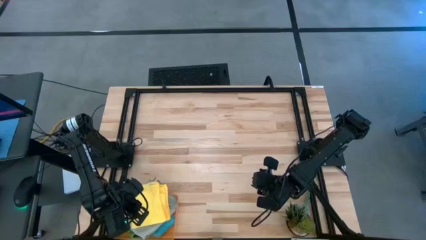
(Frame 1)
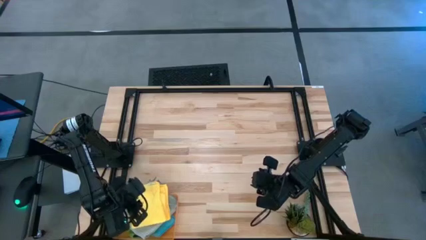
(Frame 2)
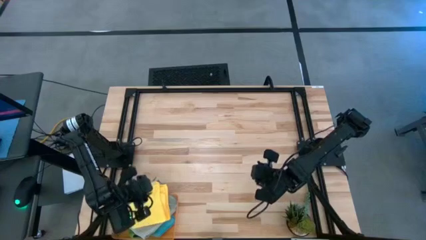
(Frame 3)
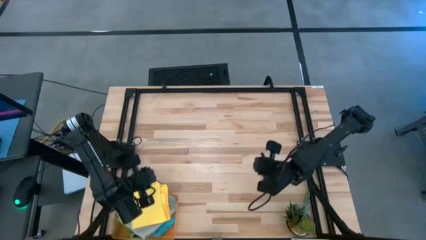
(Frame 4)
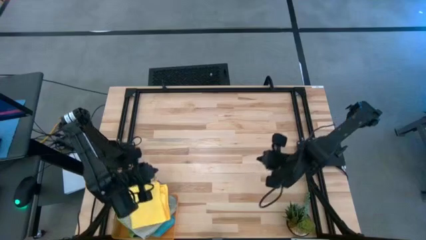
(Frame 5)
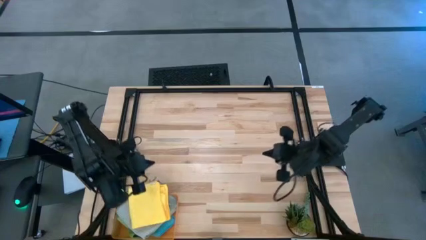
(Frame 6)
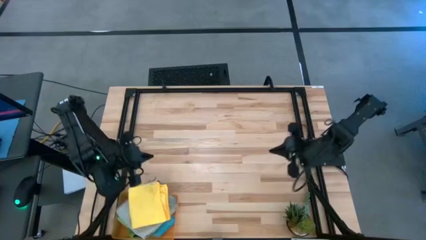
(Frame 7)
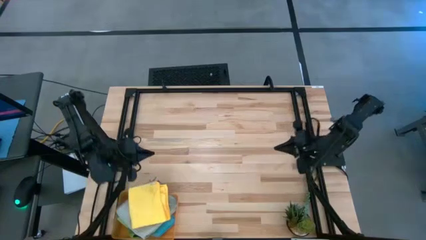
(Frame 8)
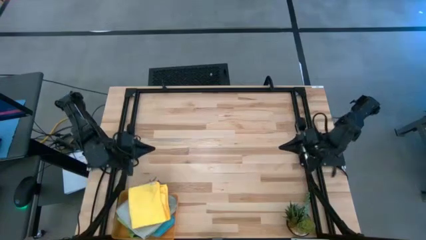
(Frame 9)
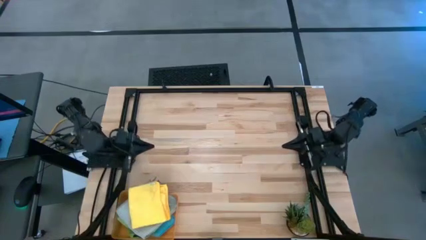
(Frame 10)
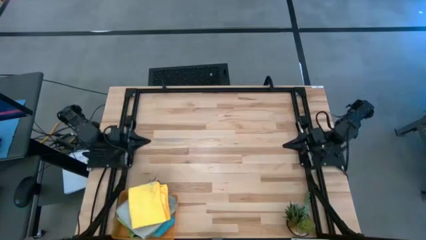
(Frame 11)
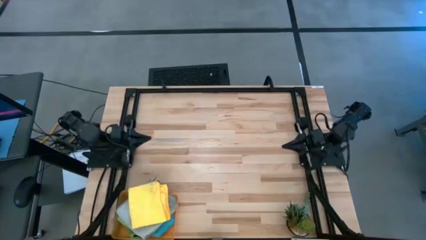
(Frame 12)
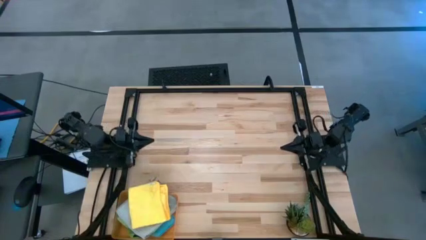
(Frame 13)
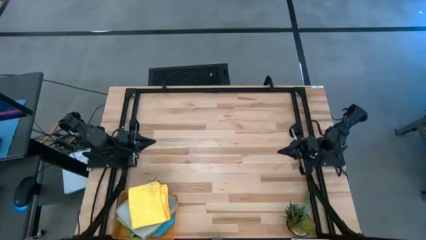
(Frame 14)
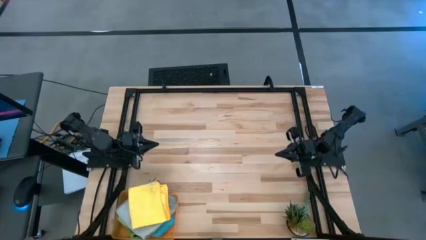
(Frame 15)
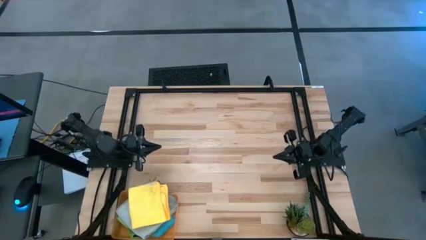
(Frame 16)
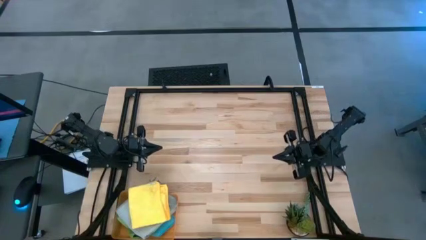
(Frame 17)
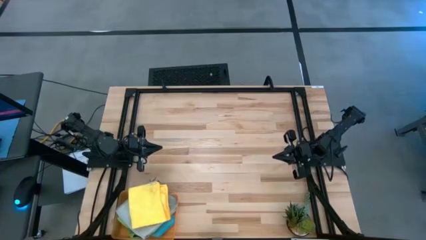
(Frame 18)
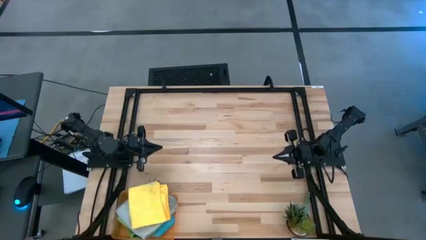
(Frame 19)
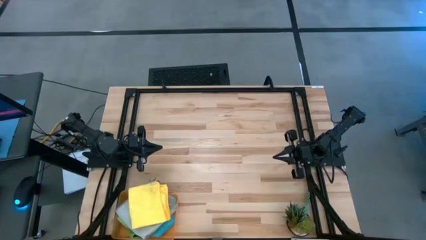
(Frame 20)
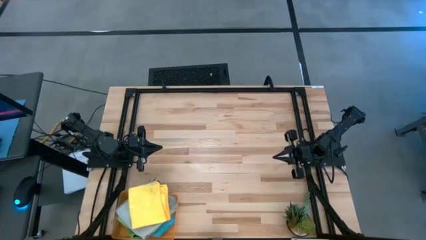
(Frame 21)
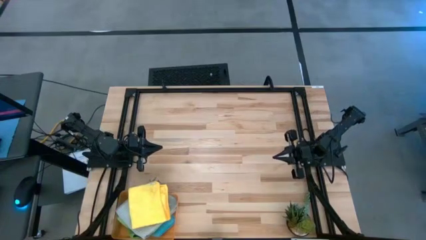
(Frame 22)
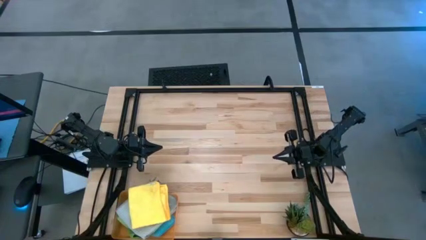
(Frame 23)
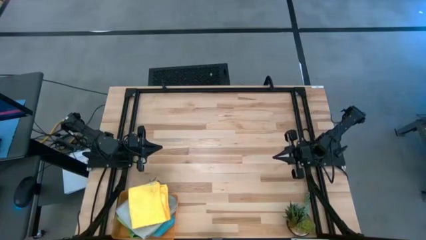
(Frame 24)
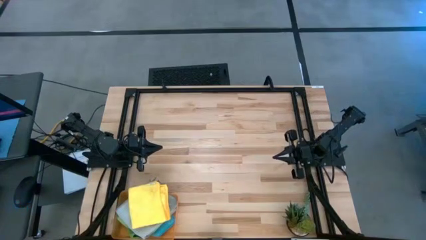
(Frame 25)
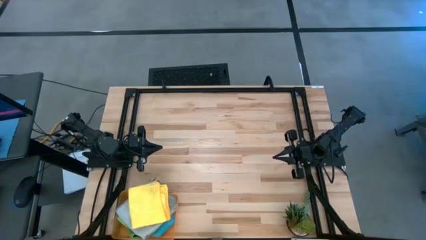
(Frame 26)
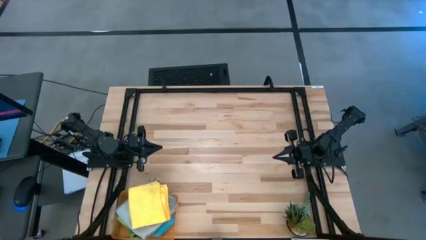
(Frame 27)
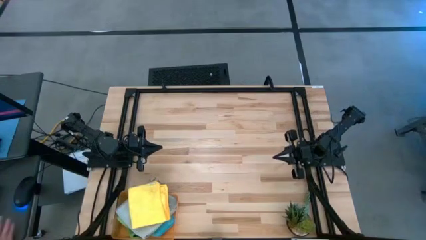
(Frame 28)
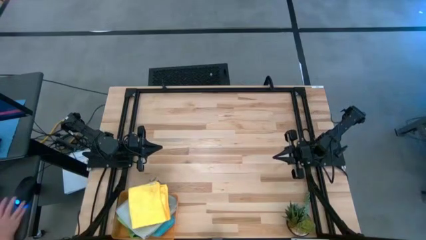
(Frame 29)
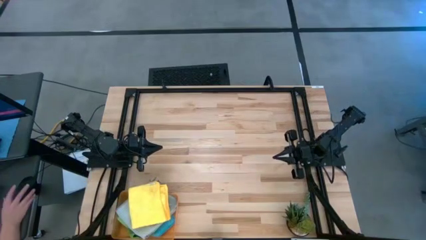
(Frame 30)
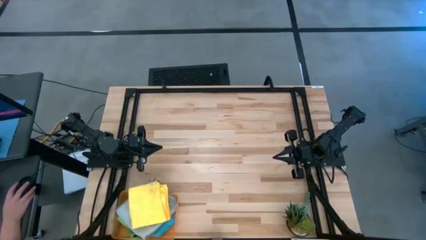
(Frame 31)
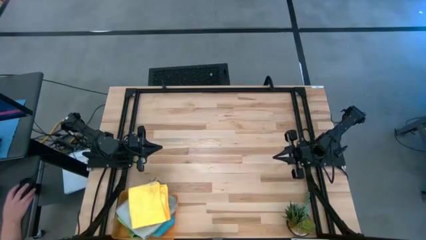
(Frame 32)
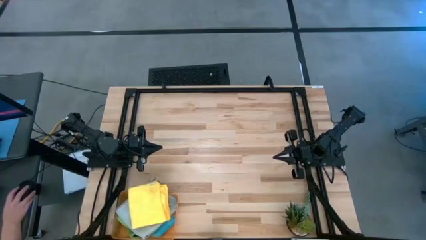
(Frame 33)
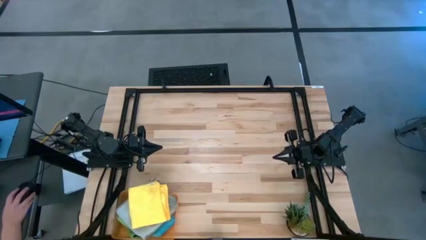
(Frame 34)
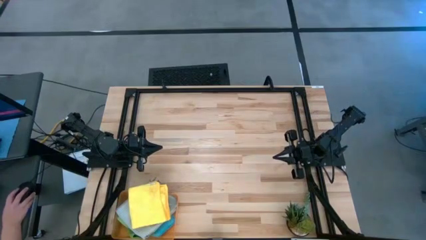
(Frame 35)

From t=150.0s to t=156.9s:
Task: Fold microfiber towels
Return to Home Position

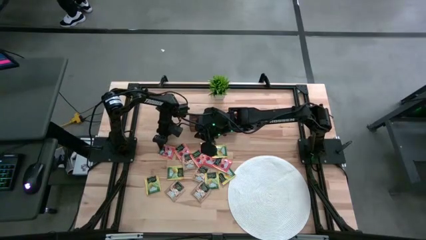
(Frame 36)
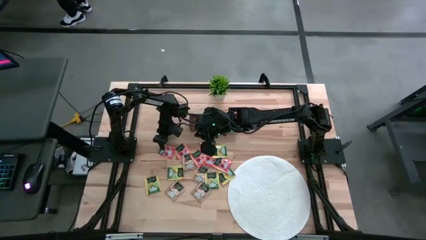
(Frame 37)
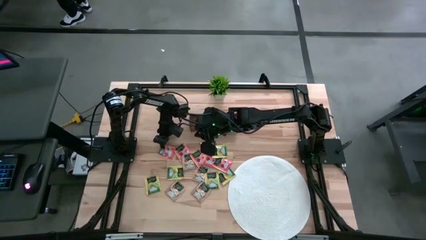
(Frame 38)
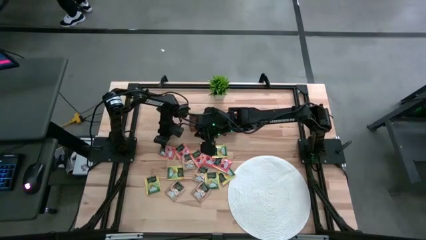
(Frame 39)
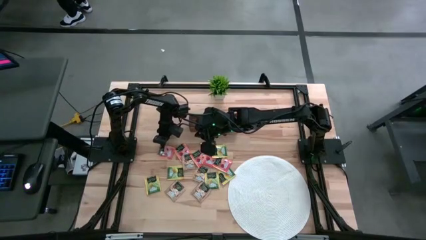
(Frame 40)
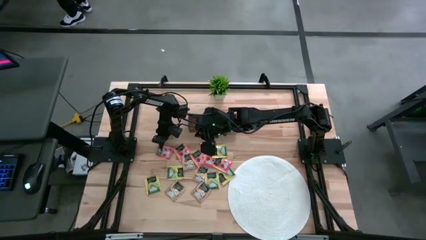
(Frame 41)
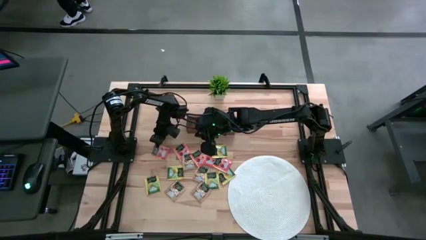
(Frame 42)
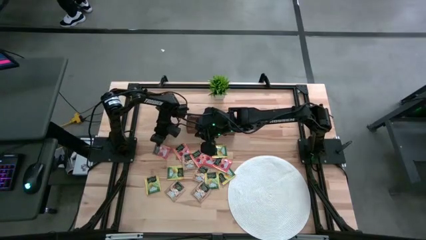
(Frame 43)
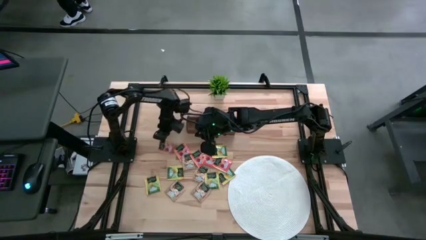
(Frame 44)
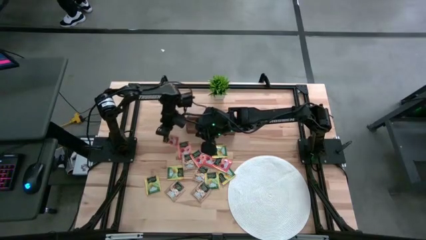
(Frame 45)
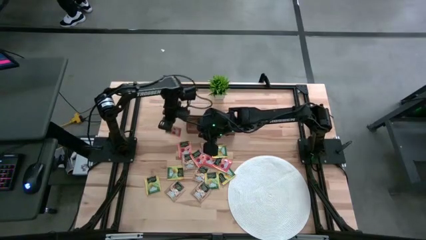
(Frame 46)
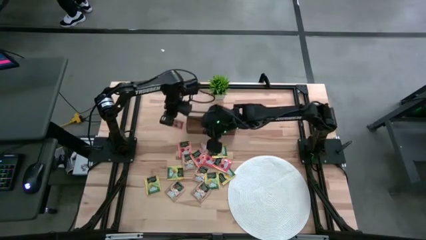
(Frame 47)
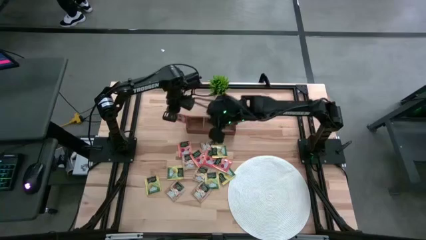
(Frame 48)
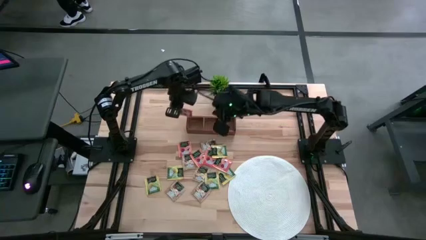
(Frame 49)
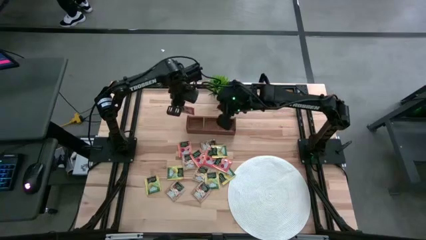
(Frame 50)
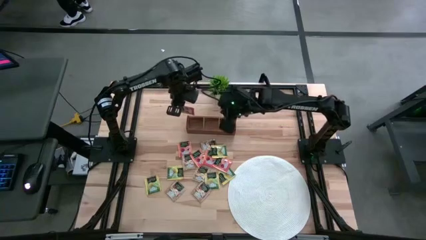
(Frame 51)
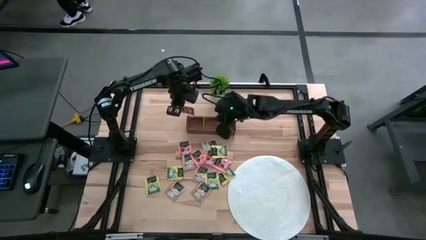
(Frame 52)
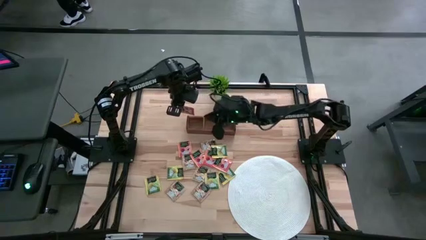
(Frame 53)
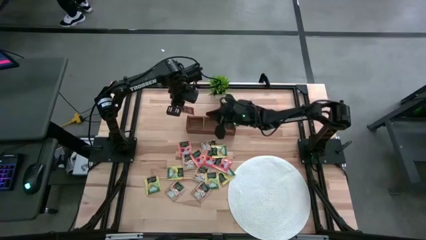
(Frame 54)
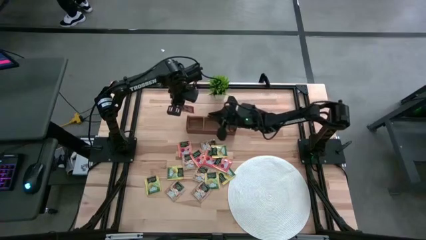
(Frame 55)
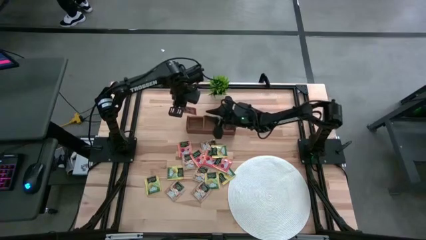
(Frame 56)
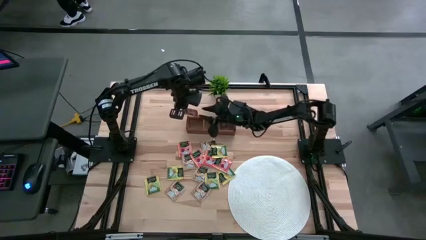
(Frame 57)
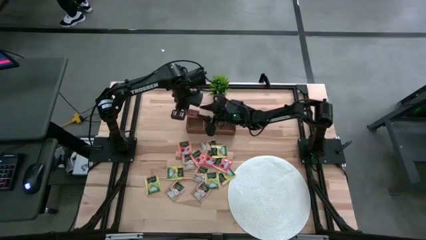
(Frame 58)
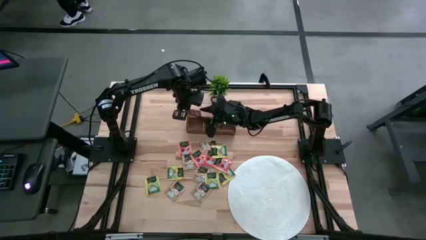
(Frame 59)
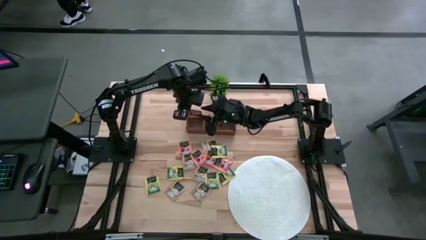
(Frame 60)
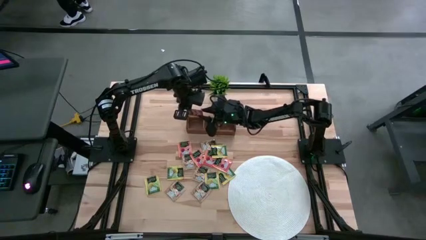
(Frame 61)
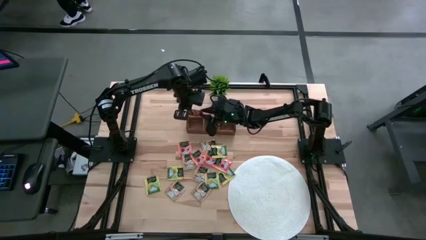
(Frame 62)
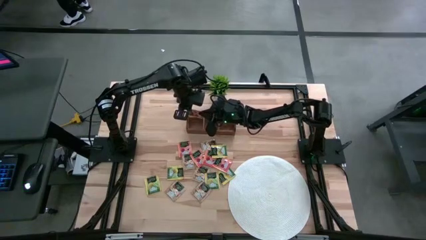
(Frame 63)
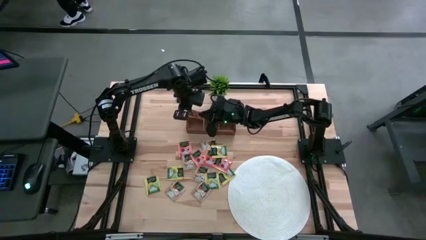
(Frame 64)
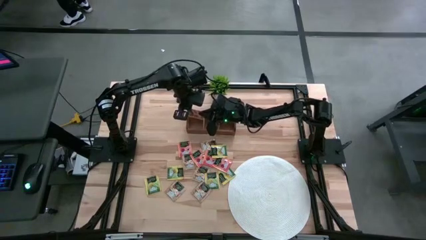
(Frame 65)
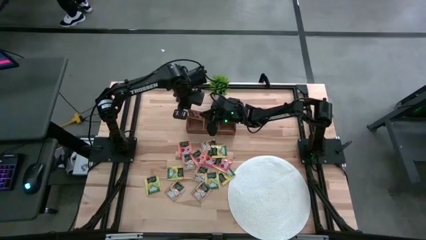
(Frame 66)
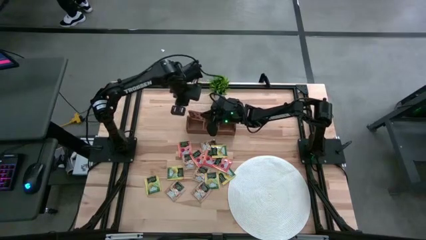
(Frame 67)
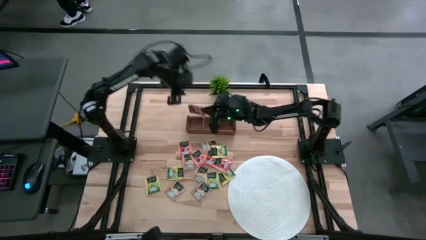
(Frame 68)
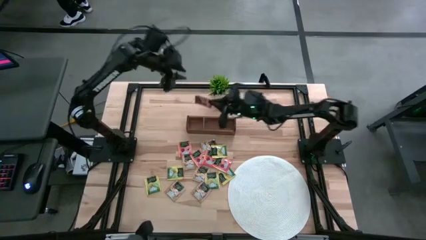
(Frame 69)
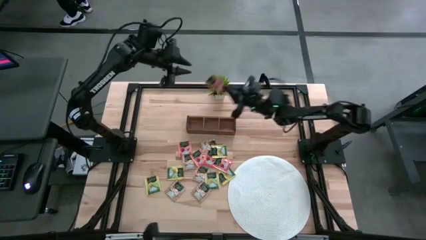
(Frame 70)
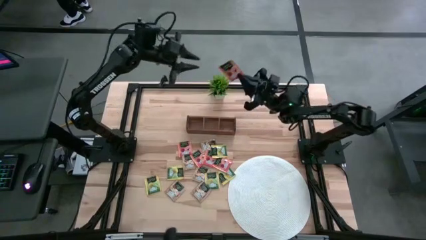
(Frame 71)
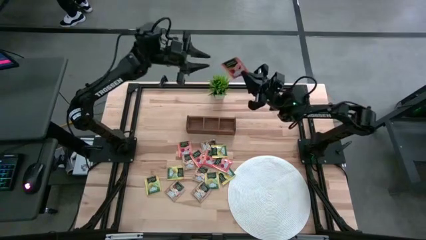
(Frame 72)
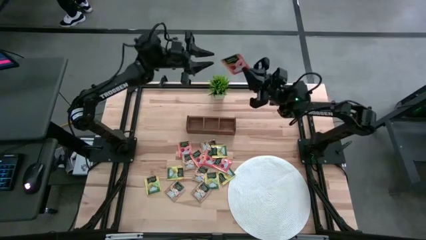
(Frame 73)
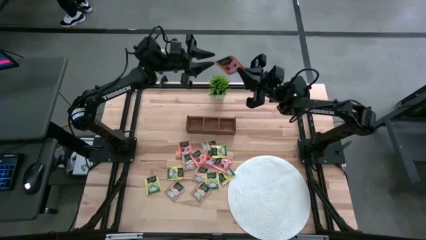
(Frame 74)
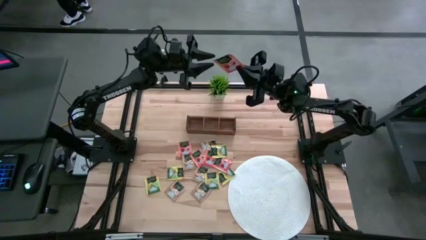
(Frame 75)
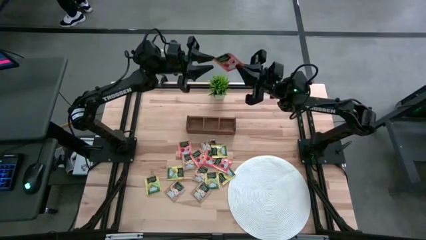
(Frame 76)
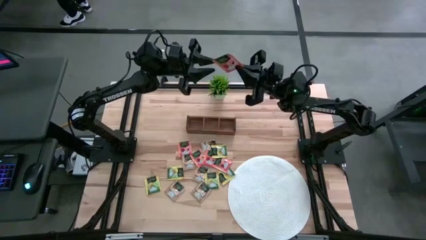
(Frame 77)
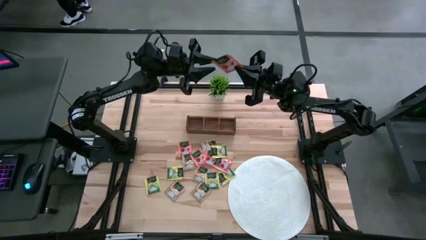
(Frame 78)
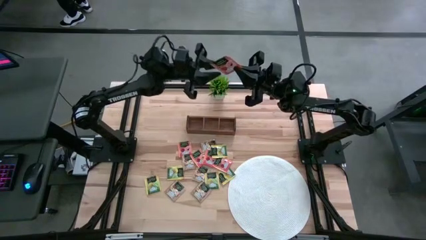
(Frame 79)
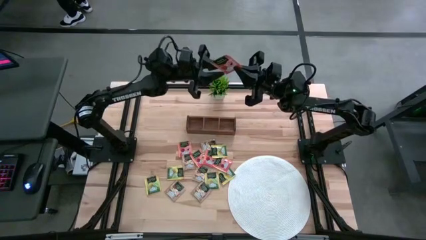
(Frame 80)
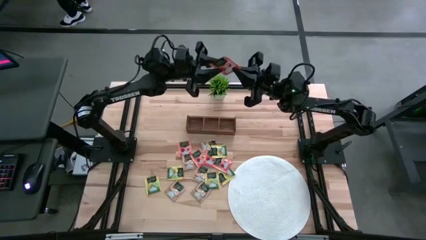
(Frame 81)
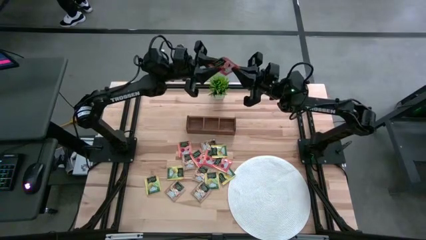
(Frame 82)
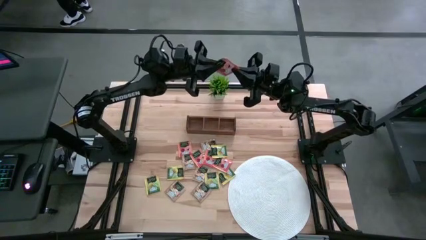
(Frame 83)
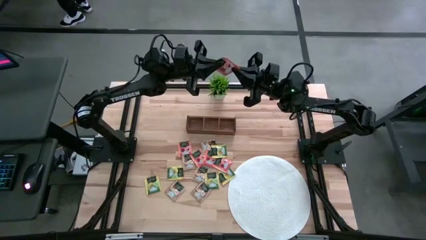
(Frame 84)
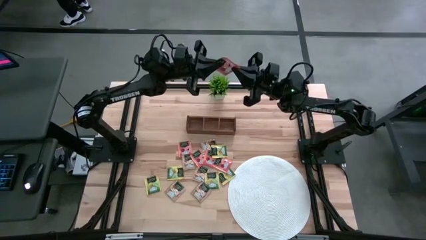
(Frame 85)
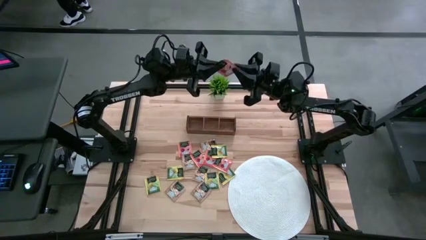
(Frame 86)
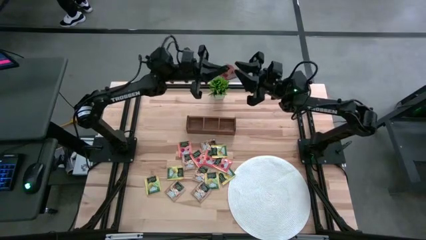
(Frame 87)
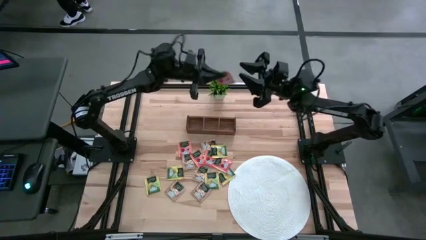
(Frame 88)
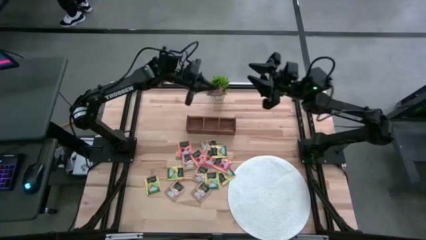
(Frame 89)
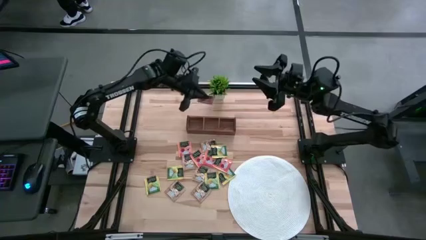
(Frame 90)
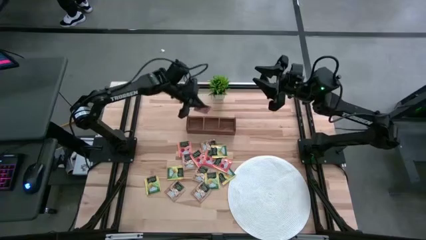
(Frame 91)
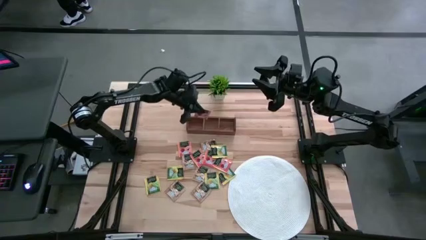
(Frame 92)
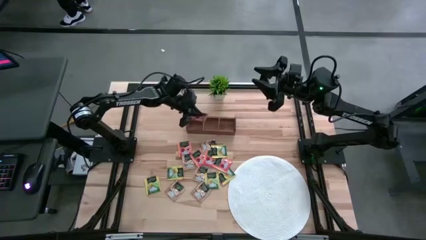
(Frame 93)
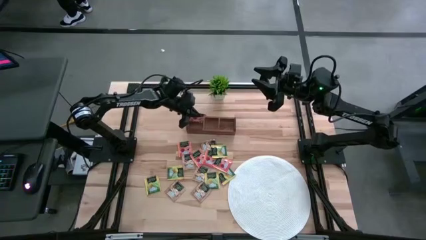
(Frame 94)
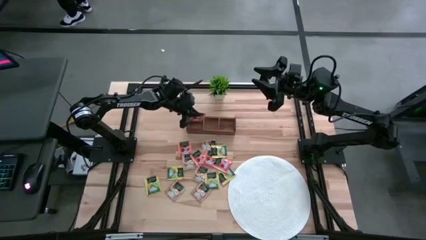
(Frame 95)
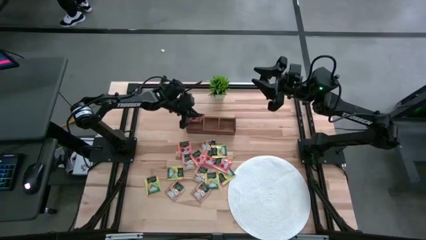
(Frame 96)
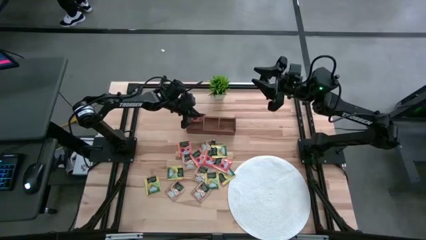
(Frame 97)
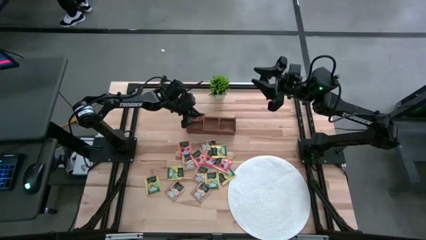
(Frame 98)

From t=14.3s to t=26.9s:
Task: Pick & Place Tea
Put the orange tea bag into the left section of the wooden organizer
